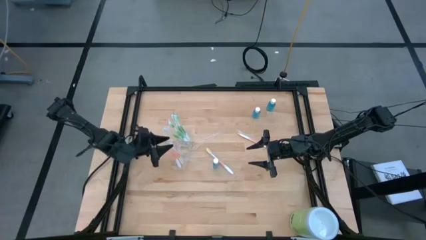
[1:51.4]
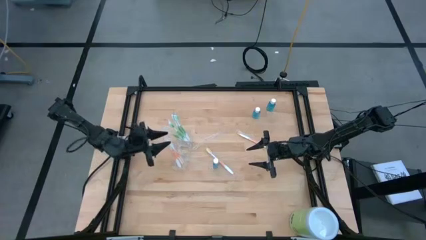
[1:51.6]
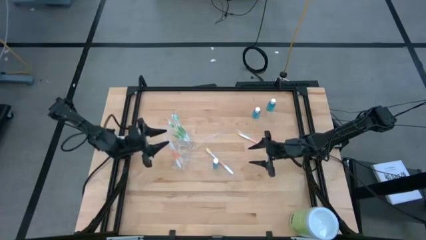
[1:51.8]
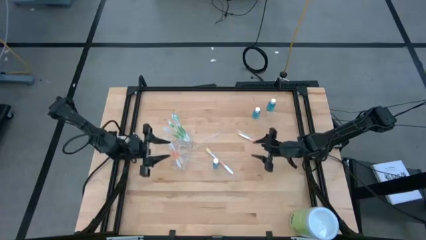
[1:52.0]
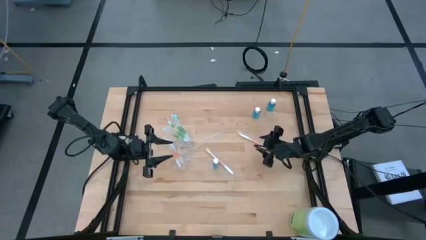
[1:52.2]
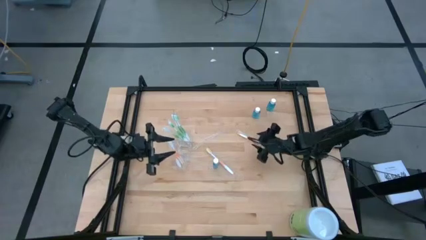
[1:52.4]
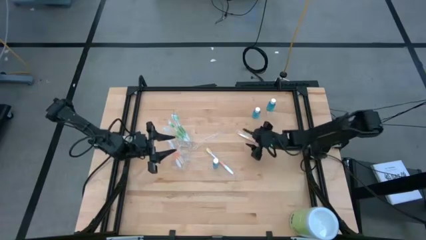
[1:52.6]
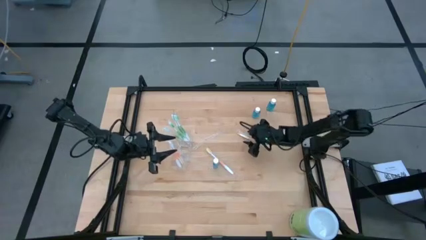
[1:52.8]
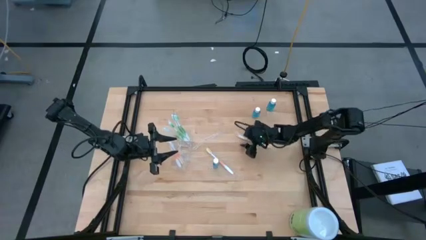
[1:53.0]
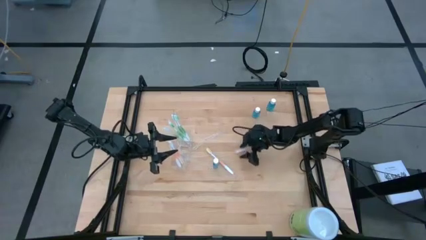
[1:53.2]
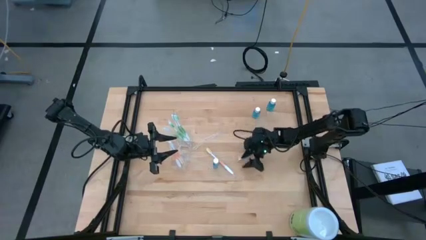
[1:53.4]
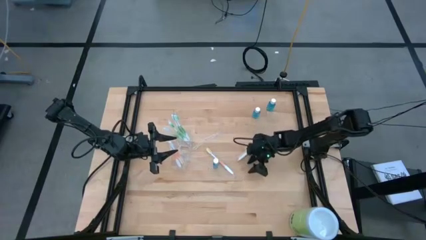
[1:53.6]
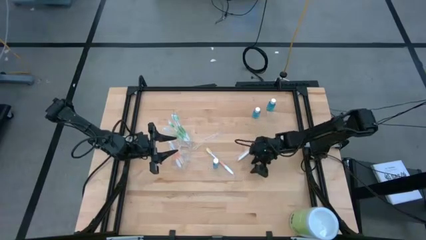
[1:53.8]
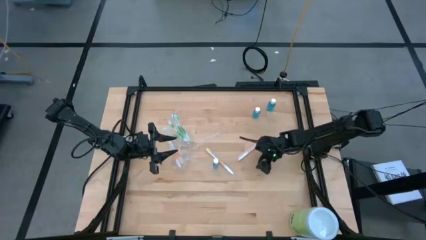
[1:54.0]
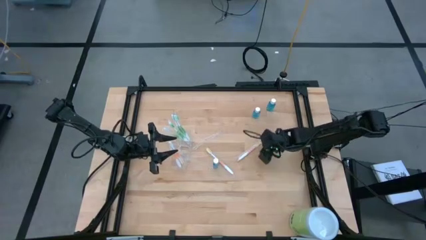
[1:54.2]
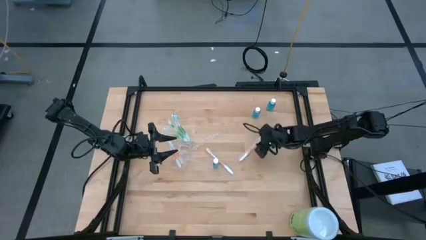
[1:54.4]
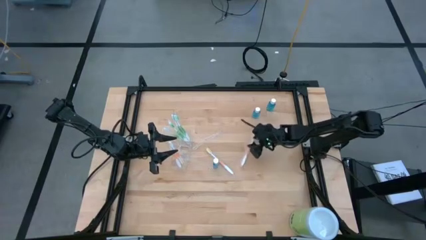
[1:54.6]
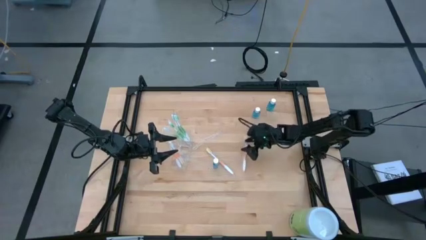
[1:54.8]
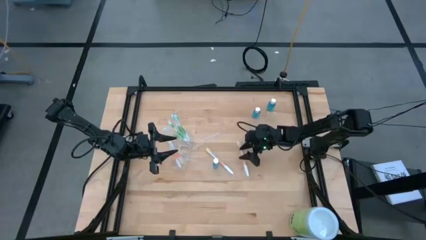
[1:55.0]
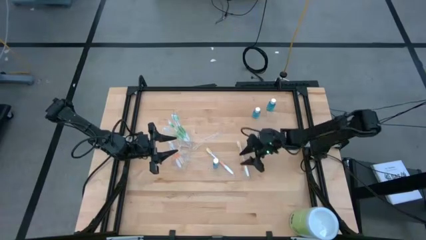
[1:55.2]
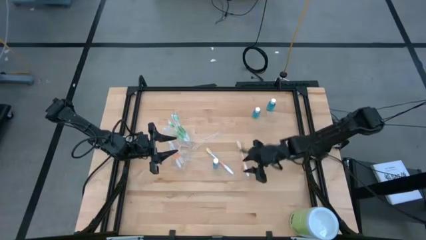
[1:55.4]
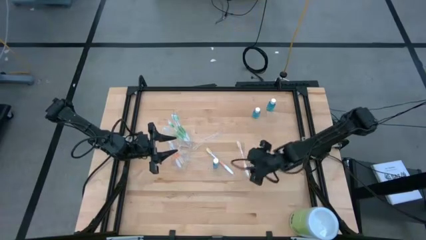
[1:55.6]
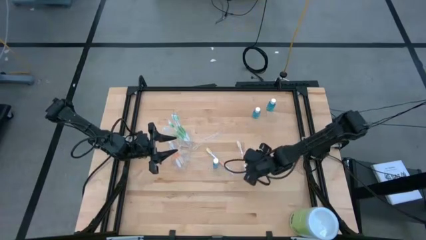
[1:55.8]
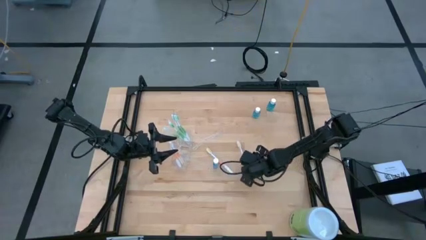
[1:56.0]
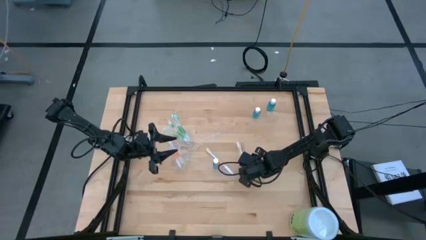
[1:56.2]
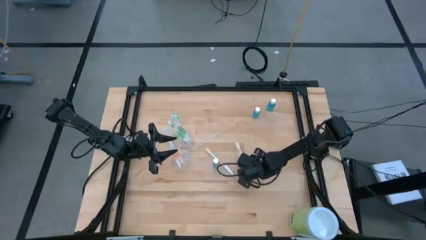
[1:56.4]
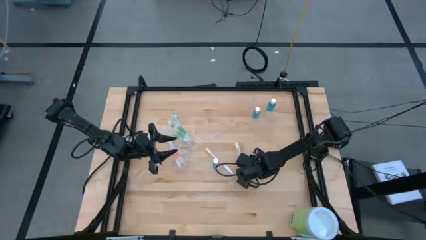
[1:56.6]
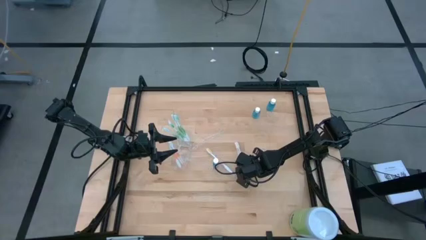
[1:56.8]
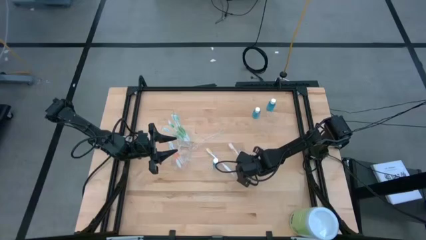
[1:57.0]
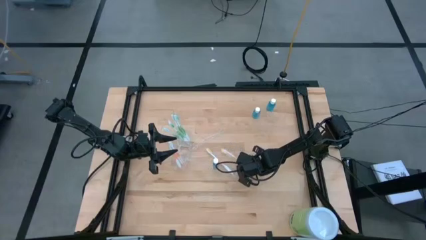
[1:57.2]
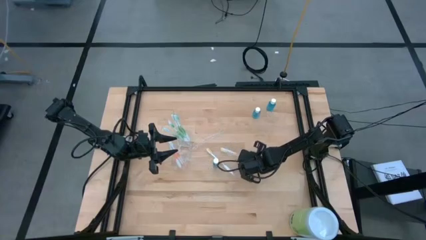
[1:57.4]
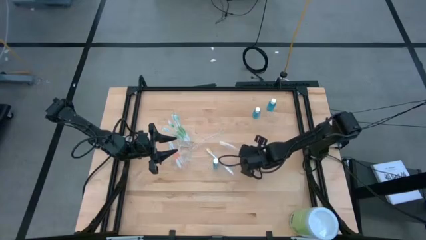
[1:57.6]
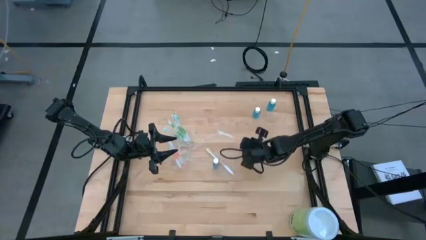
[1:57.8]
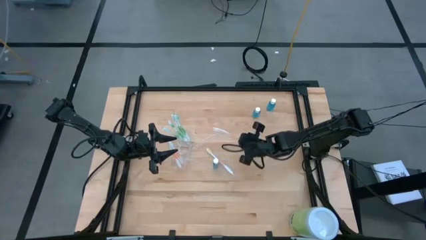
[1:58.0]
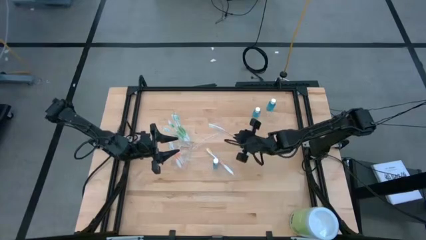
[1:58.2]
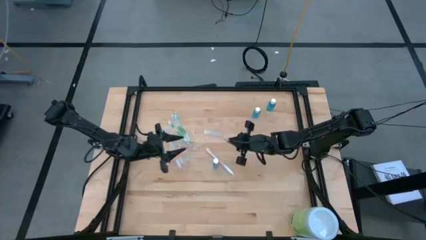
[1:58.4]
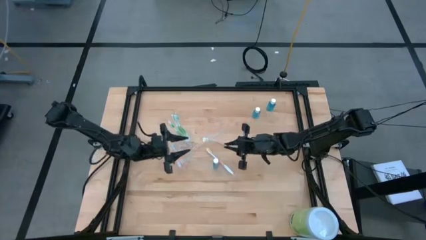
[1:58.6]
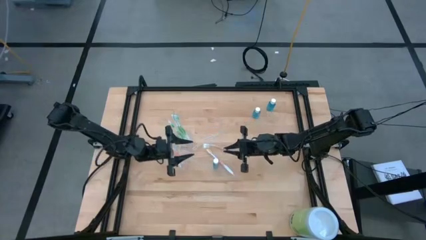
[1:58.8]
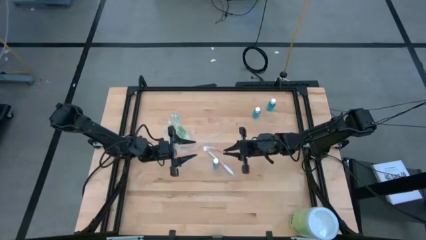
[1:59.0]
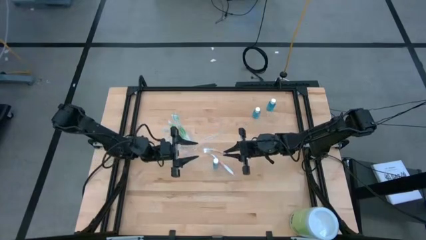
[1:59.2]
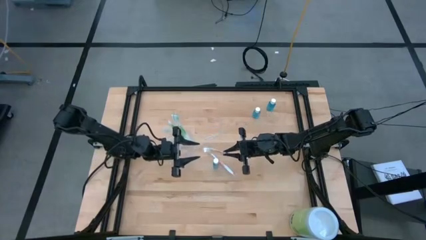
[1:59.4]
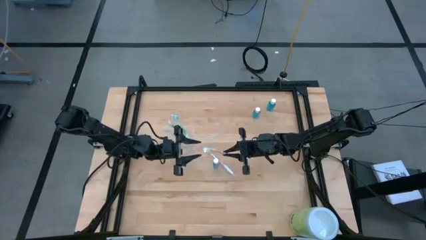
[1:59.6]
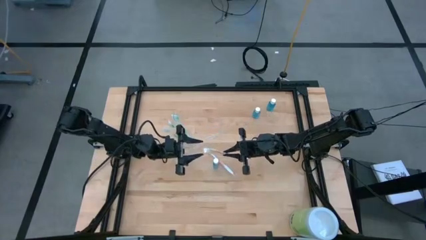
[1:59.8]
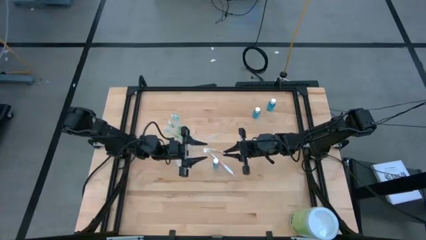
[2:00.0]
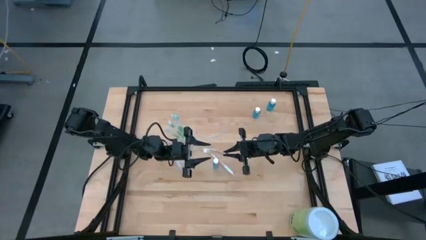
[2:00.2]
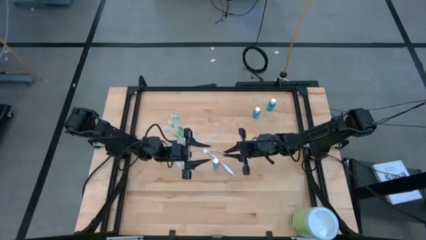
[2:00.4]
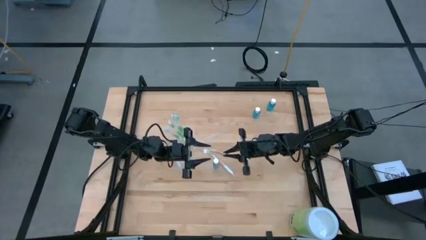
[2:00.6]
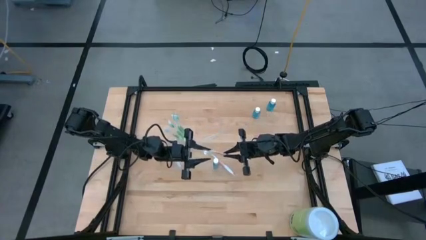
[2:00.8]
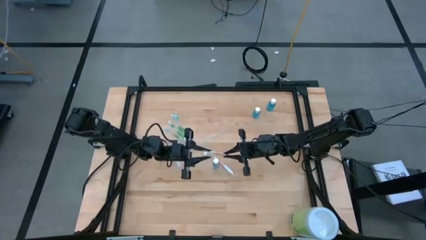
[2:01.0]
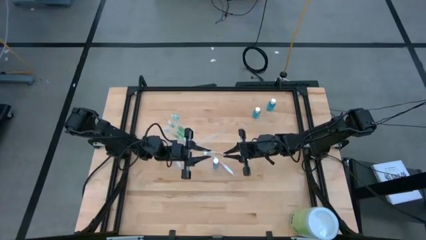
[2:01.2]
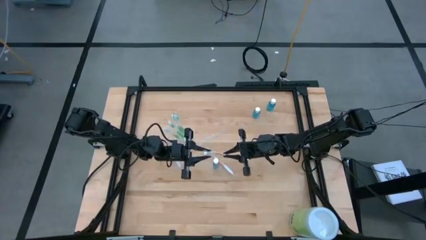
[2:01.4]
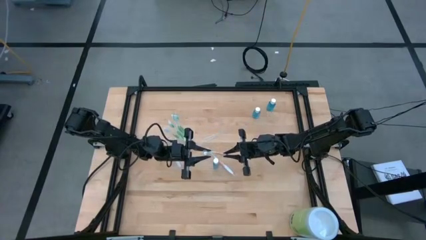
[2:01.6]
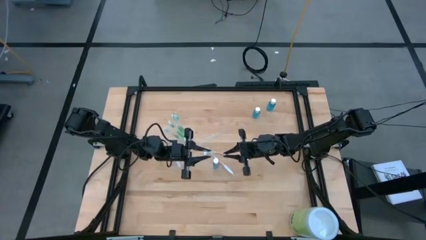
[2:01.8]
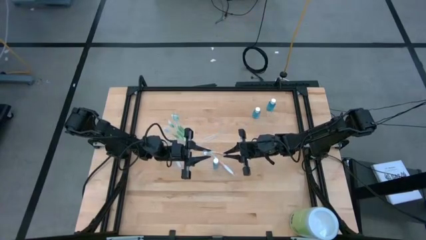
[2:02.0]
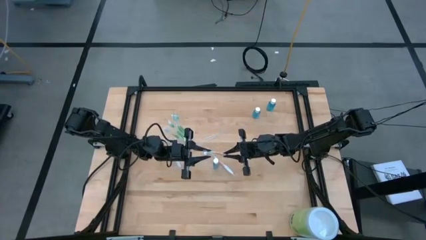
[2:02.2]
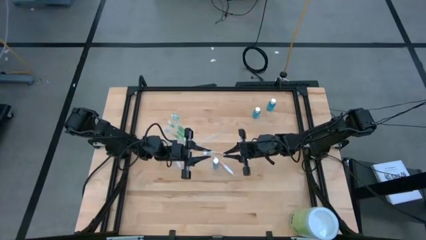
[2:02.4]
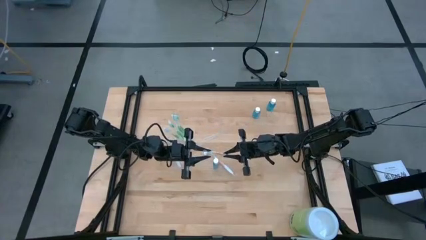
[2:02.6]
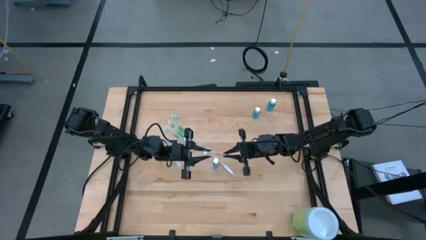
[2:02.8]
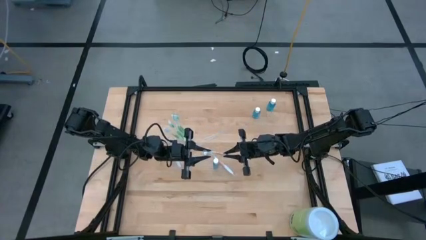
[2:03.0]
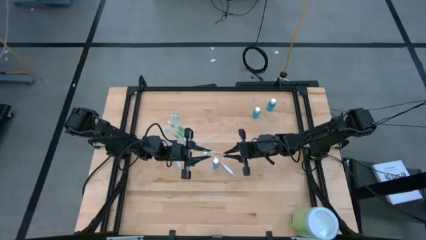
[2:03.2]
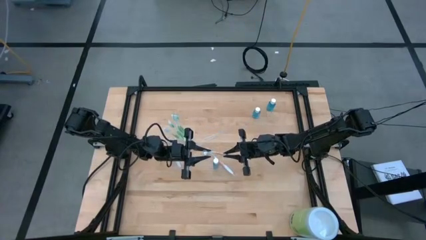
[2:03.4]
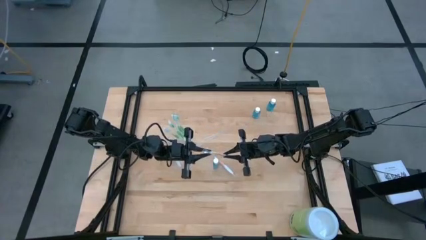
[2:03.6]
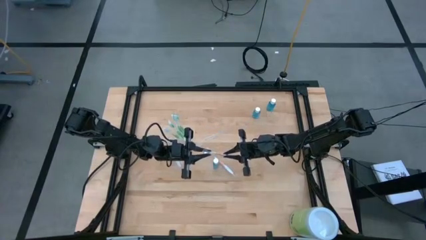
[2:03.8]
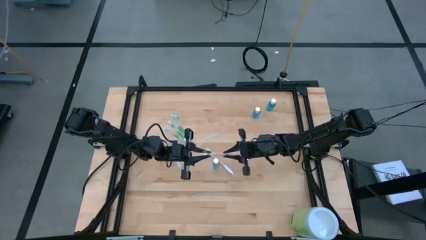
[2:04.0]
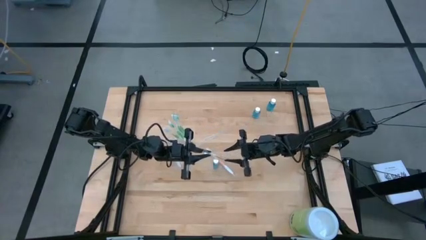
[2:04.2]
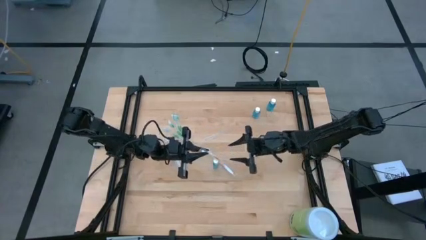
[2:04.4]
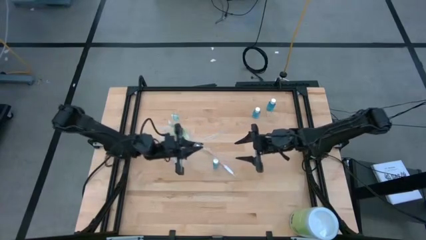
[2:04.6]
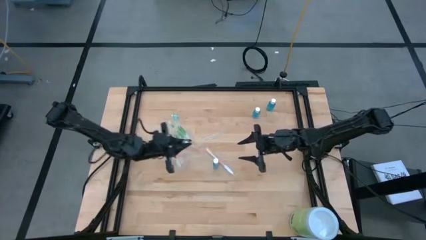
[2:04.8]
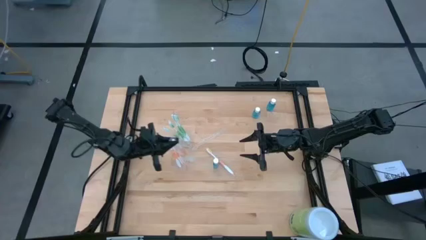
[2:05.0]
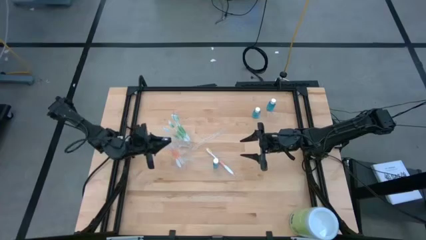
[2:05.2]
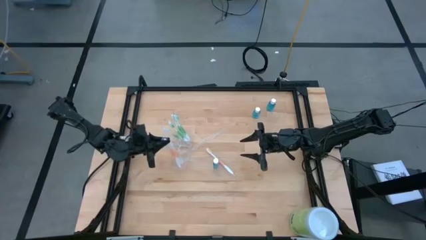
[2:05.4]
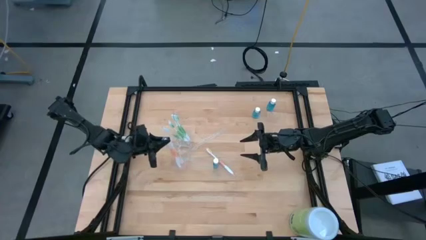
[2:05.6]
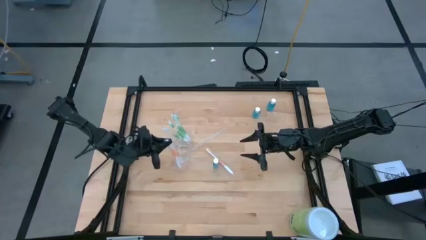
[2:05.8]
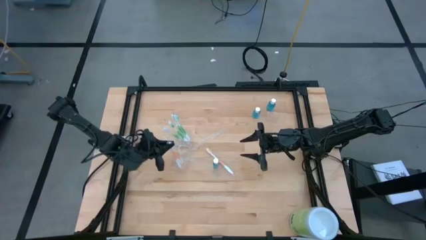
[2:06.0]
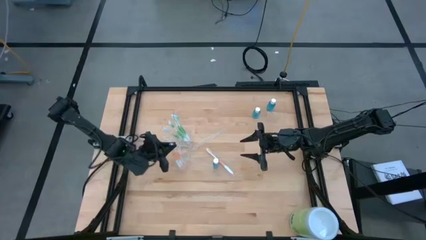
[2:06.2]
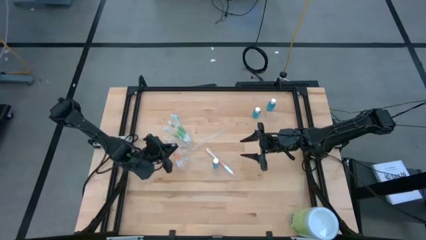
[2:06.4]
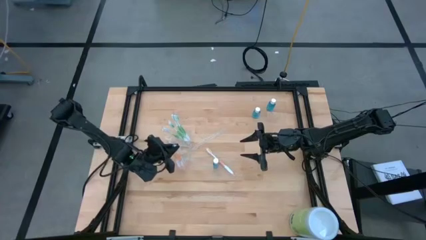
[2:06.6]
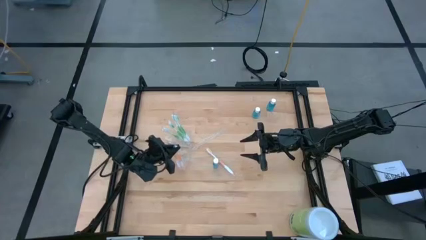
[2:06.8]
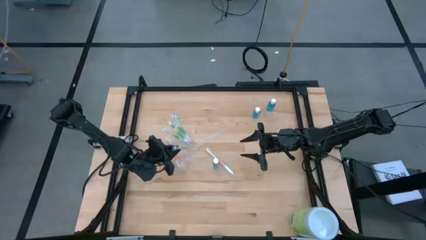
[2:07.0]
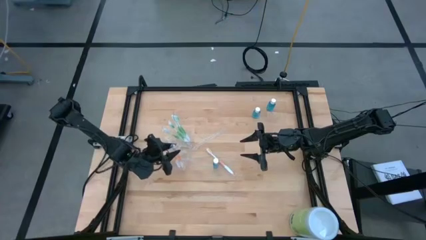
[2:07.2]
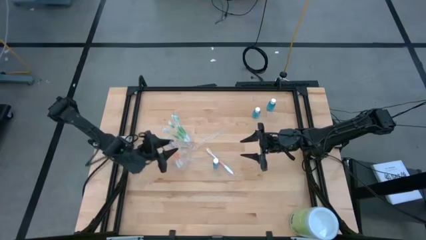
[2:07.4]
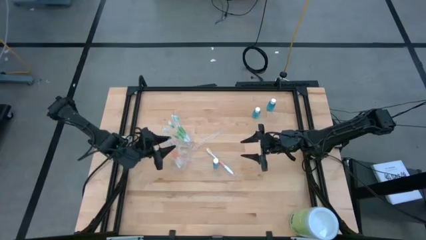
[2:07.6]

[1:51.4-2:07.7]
Task: Pick & Place toothbrushing station
Put the orange toothbrush into the bottom section of the transparent organizer
